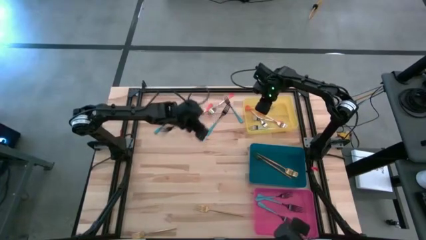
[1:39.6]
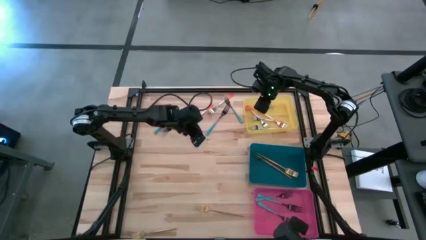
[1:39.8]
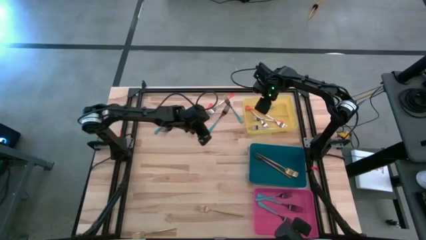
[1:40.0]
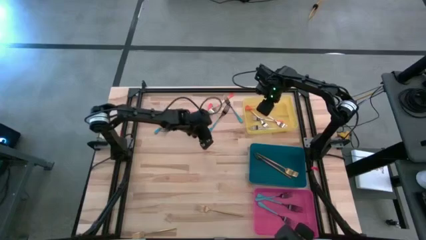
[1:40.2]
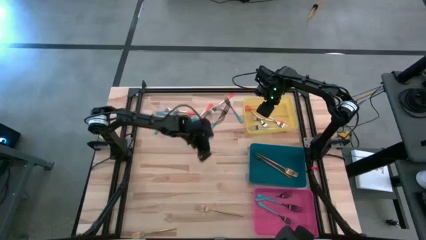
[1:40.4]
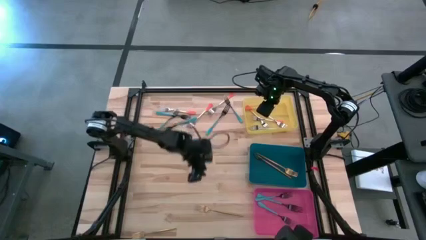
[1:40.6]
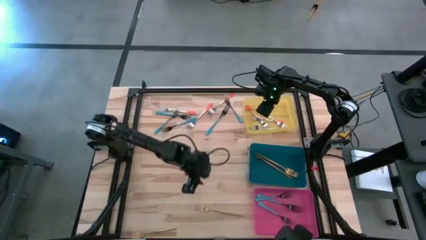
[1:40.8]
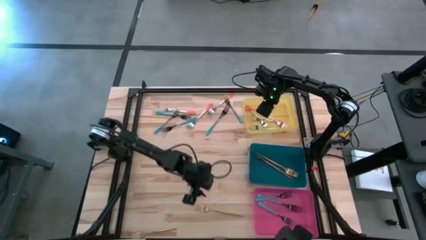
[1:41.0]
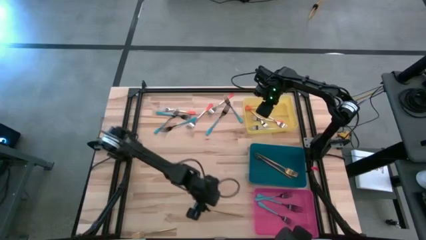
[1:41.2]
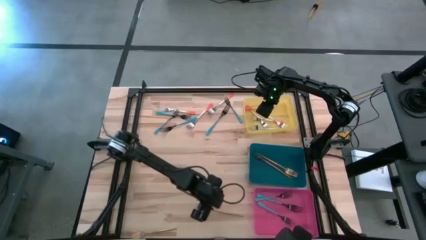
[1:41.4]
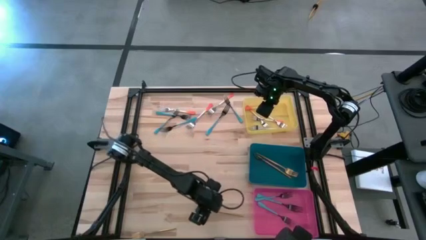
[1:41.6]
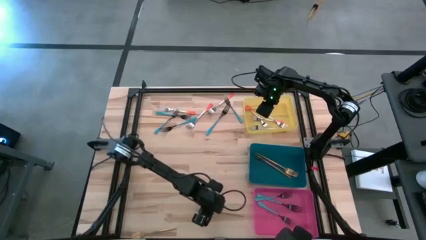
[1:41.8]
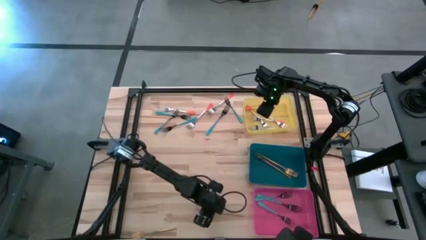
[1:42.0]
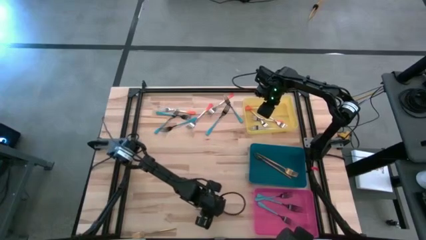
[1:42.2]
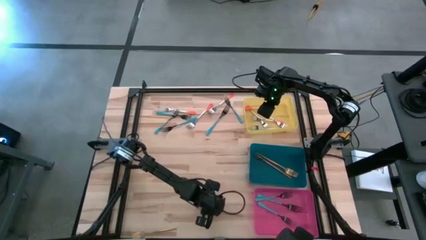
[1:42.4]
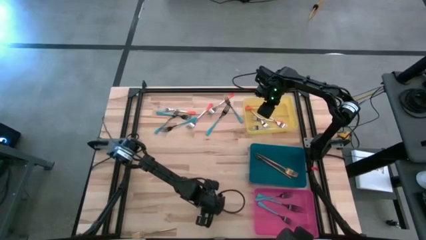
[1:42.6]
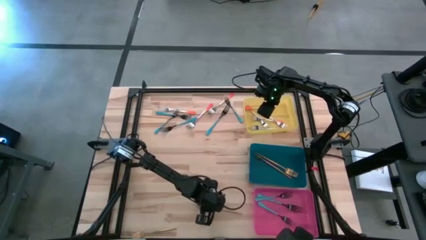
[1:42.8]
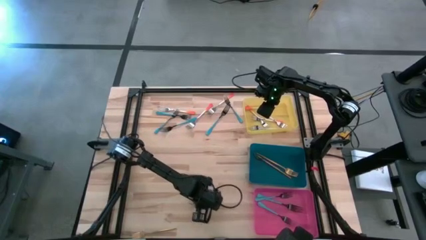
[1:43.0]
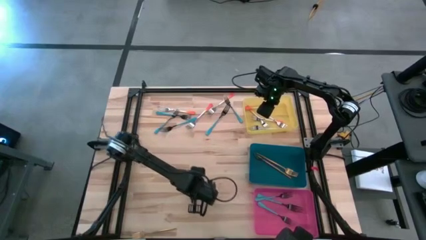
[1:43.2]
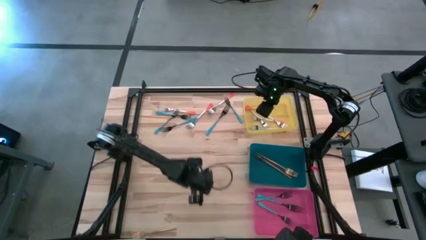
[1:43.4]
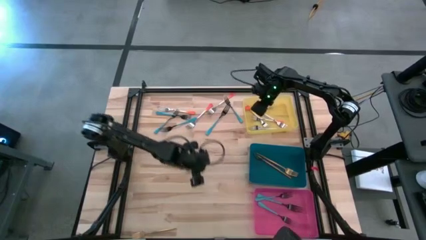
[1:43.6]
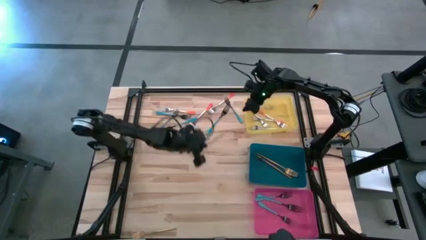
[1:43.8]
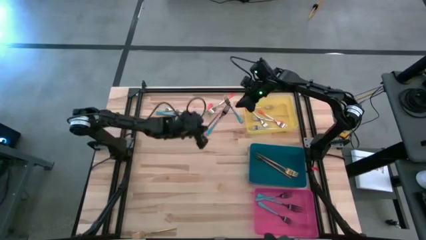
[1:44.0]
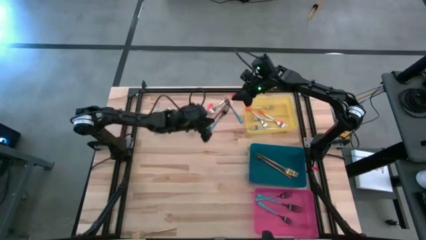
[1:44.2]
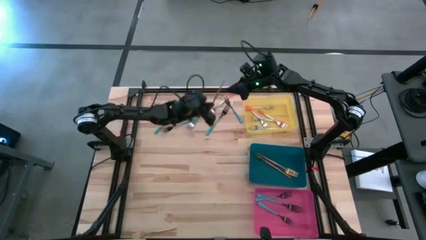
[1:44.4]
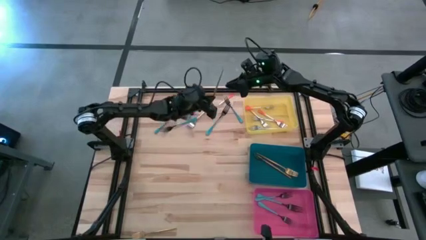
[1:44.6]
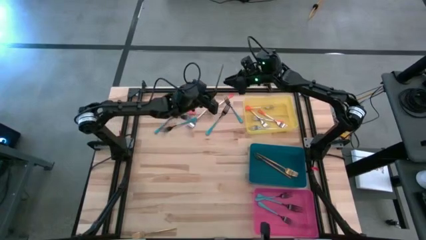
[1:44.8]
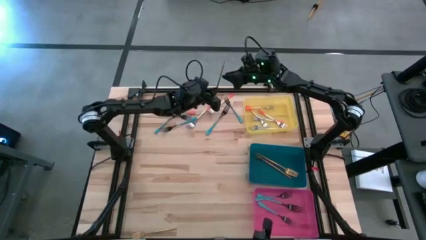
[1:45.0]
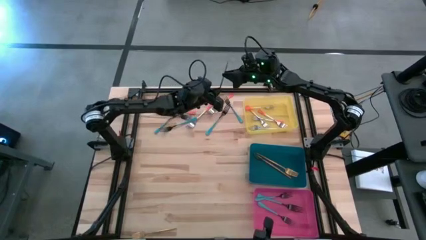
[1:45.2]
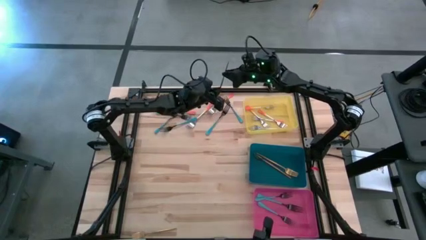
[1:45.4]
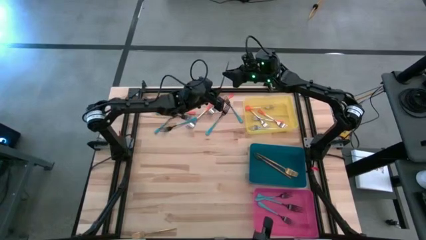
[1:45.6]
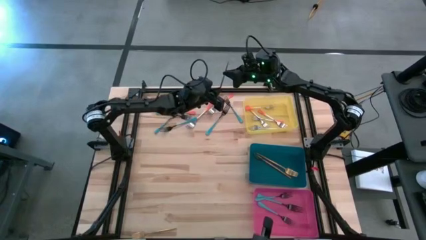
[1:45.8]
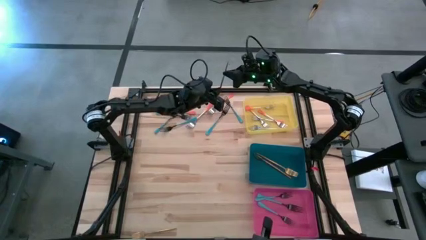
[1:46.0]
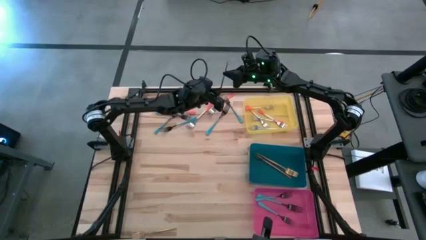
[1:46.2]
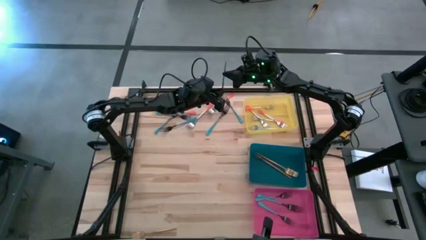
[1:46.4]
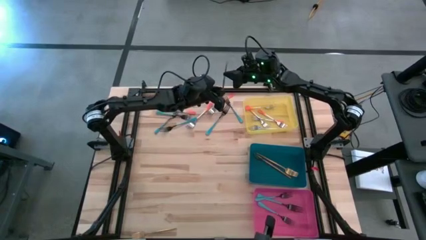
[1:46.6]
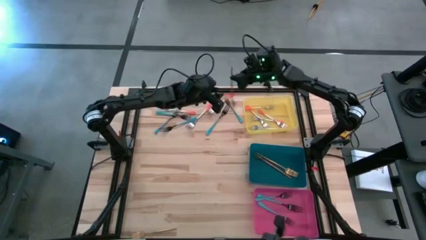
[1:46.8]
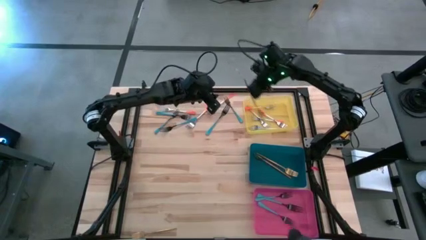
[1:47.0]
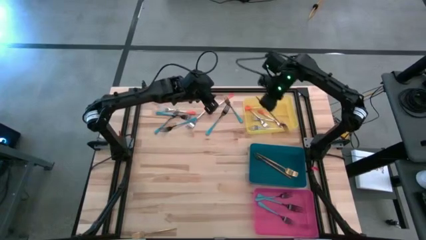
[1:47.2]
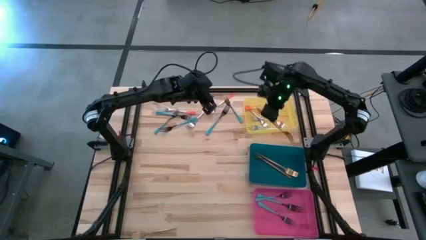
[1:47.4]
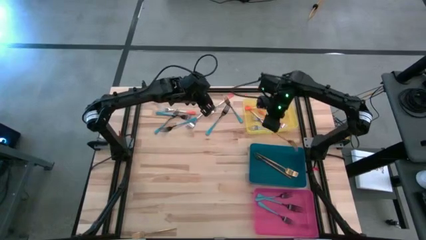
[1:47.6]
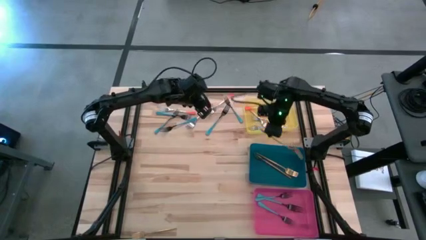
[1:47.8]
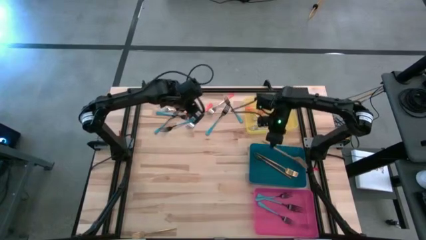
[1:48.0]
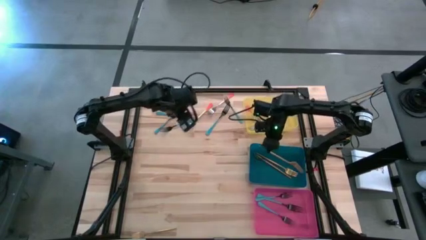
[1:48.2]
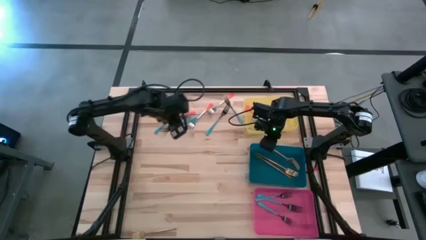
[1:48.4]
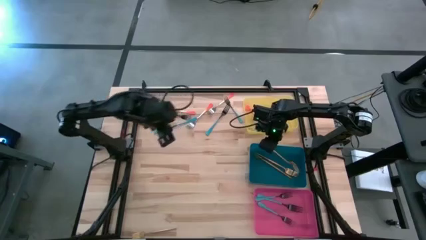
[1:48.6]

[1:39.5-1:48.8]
Task: Sort silverware by color (type)
Put the gold fork into the blue bin

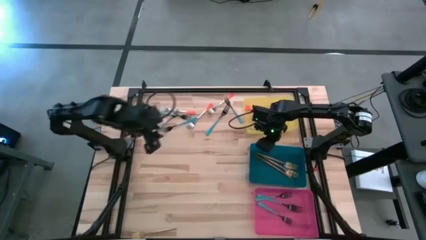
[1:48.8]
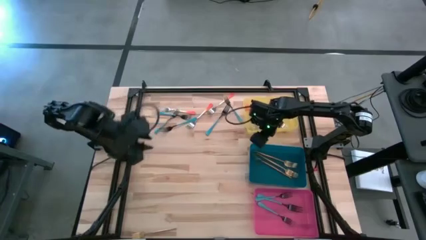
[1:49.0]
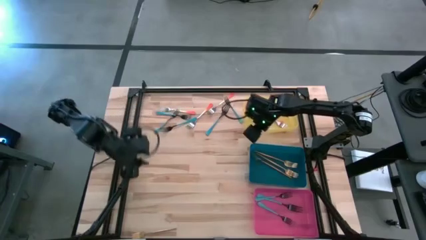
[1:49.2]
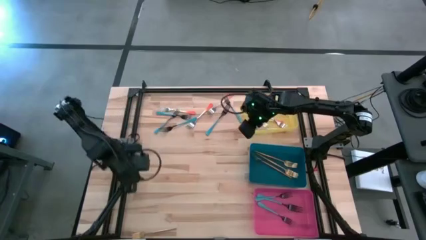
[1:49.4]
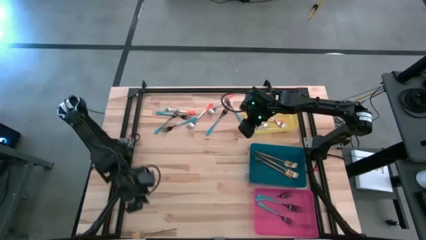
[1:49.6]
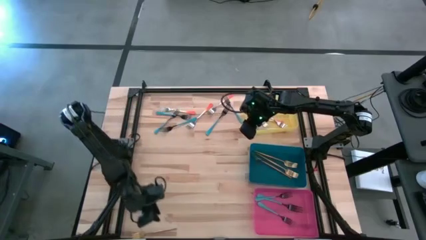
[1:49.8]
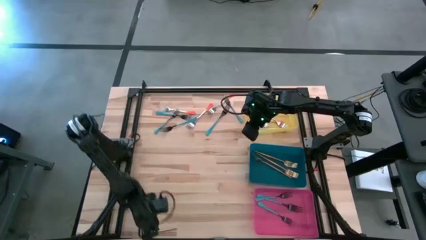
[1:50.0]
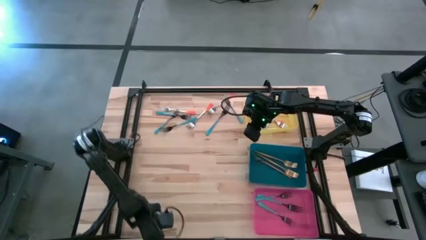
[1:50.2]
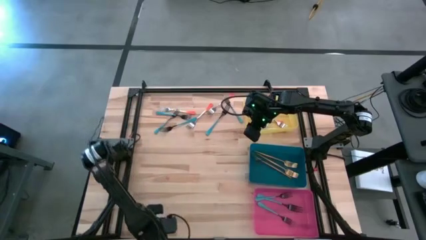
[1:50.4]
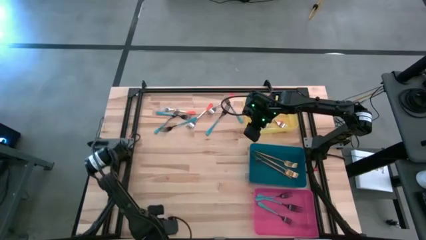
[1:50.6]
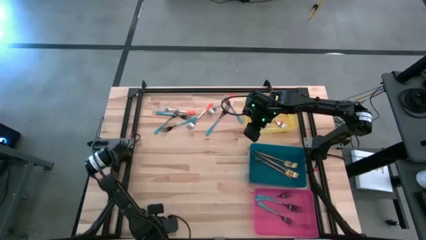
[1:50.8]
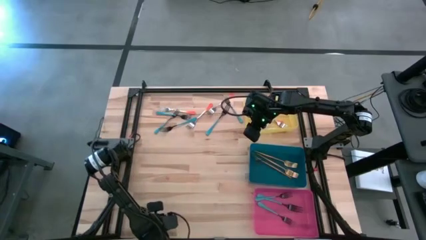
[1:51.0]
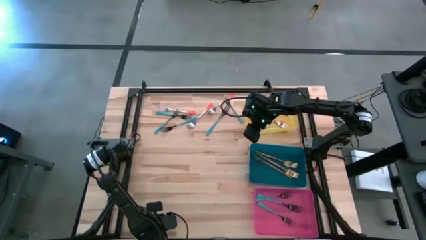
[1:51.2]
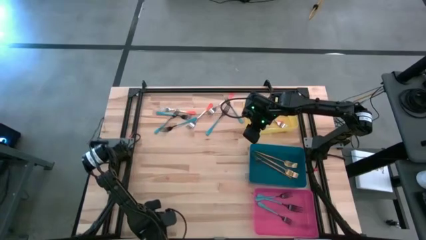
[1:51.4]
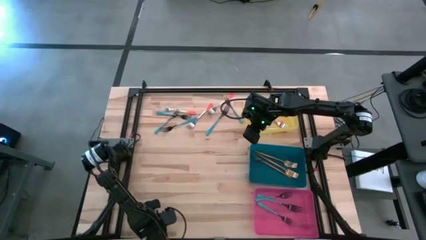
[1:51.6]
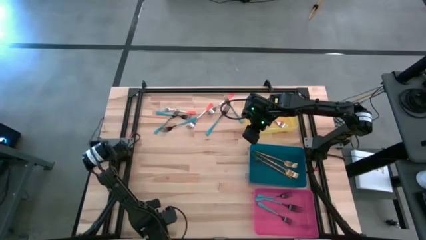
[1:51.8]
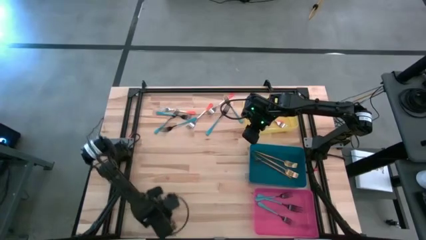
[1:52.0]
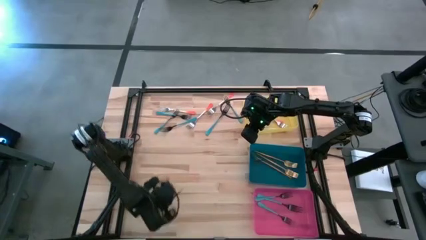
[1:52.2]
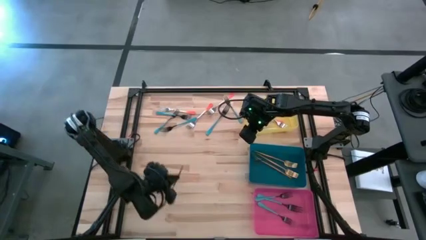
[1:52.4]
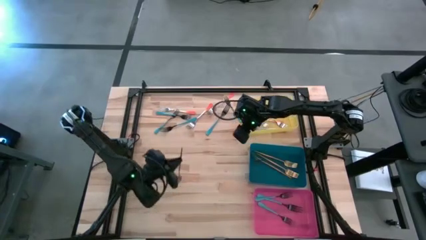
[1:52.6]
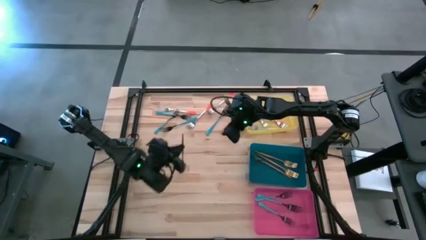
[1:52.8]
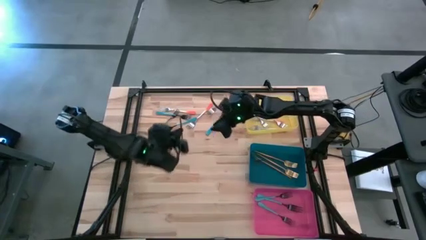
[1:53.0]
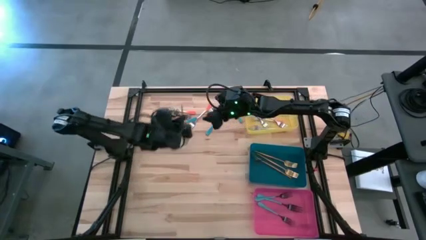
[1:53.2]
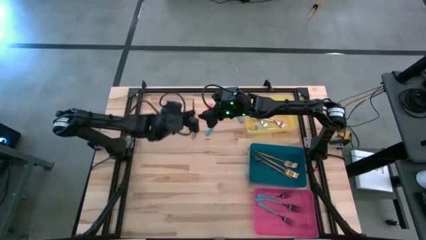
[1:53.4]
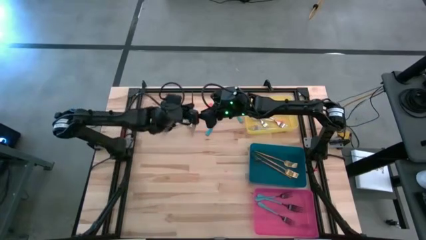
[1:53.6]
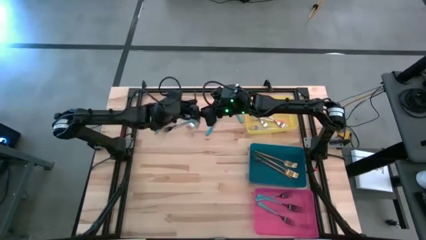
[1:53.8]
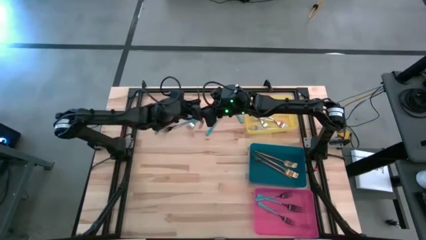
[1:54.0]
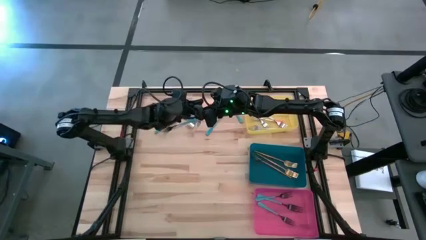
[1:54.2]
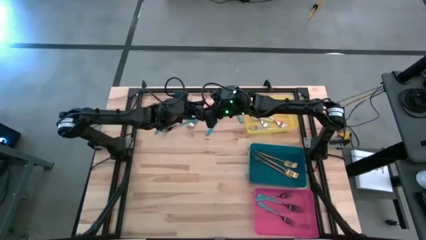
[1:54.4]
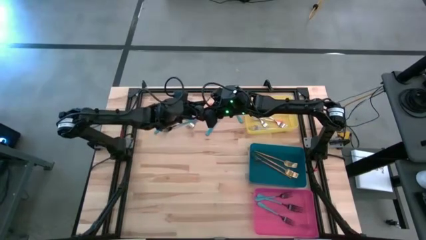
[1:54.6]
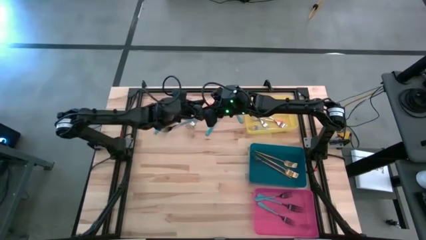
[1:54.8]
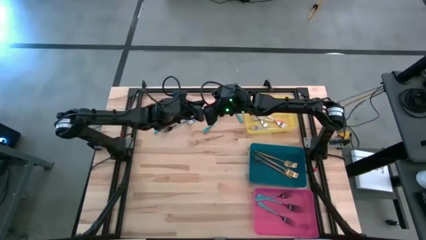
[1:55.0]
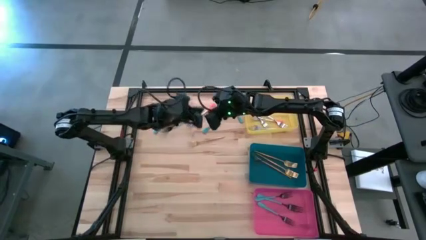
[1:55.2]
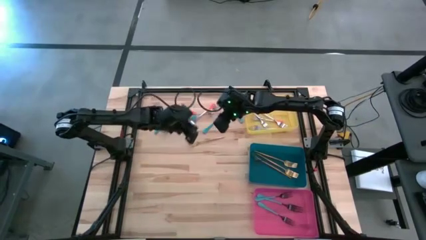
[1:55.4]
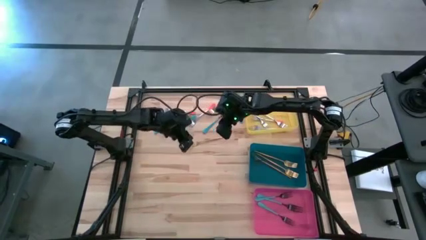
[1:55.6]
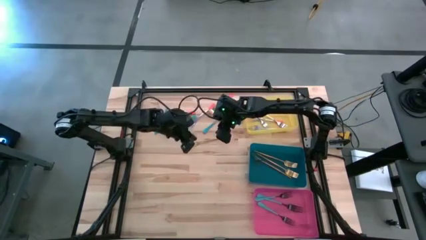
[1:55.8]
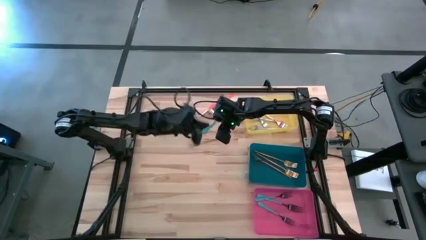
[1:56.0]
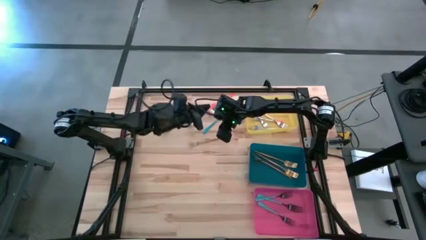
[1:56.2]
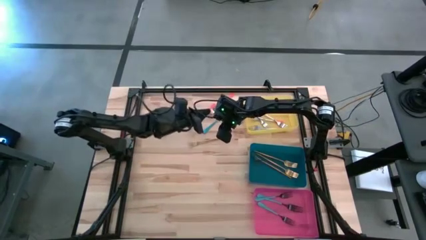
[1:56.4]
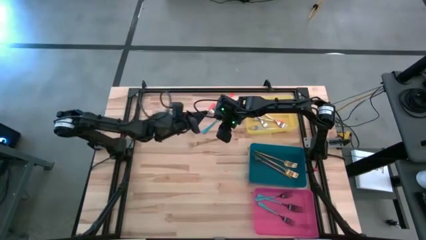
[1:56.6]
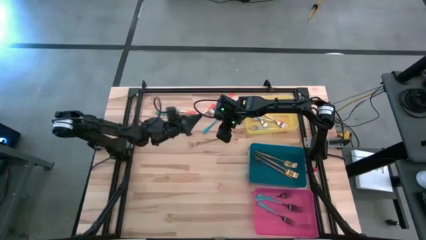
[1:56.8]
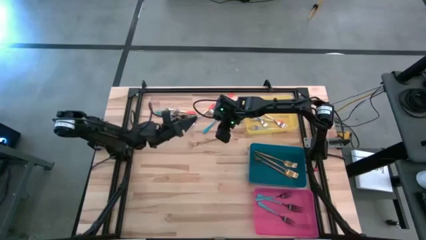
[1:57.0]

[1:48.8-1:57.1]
Put the gold fork into the blue bin
